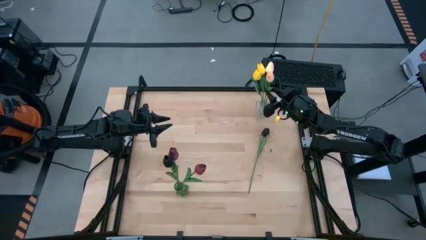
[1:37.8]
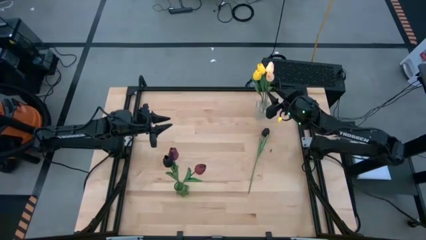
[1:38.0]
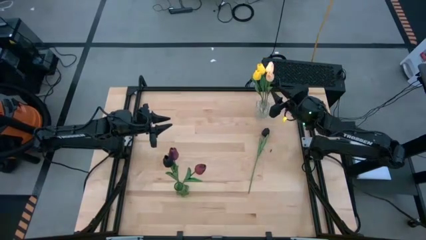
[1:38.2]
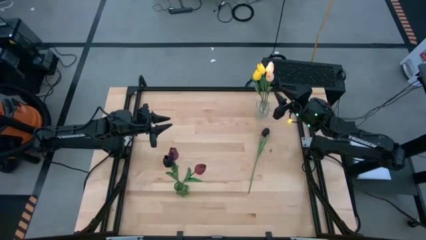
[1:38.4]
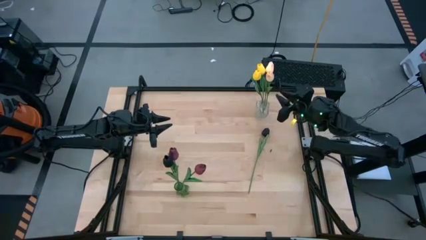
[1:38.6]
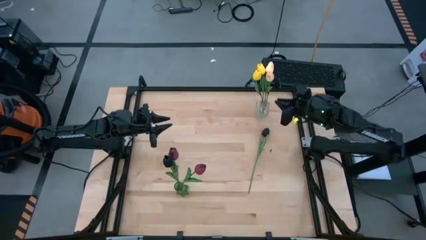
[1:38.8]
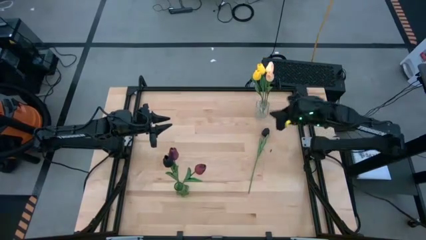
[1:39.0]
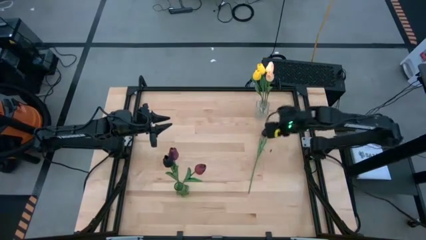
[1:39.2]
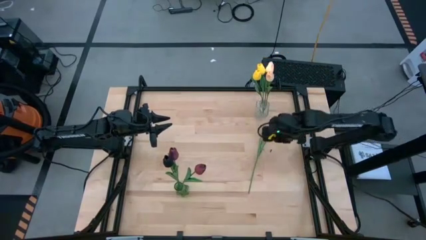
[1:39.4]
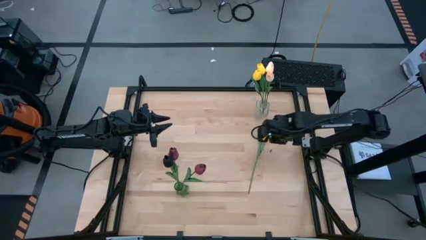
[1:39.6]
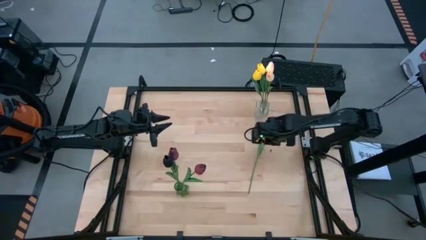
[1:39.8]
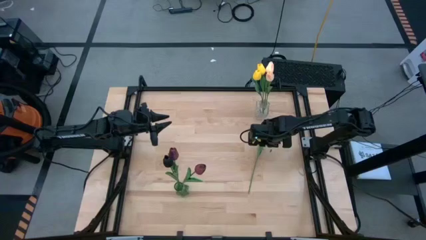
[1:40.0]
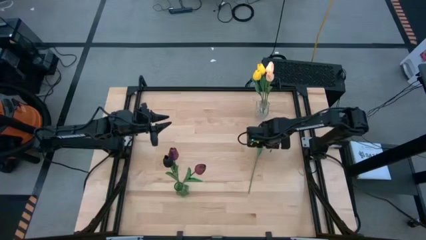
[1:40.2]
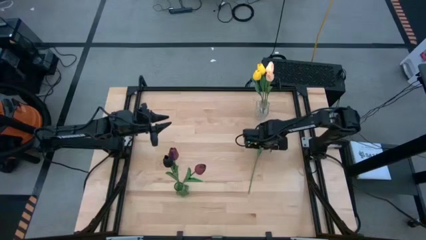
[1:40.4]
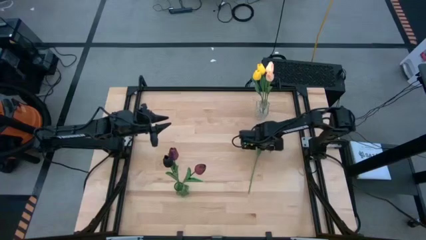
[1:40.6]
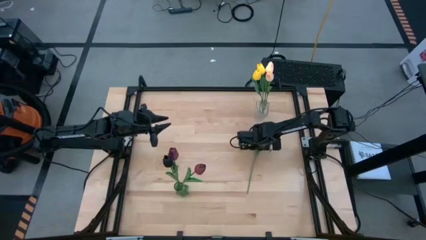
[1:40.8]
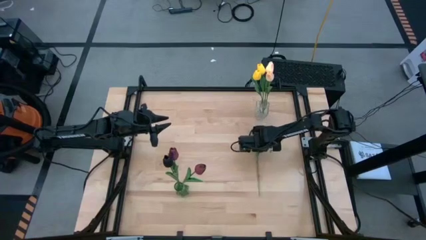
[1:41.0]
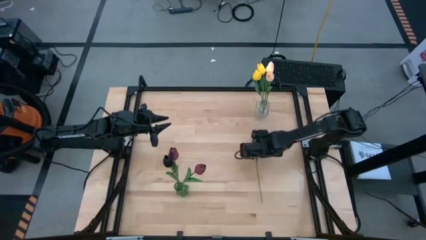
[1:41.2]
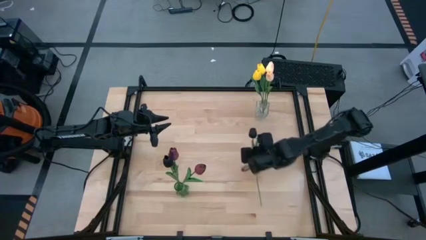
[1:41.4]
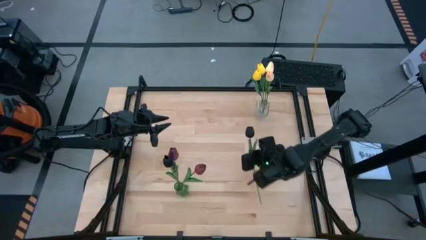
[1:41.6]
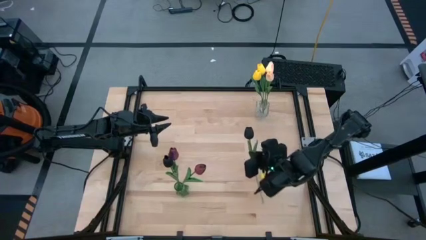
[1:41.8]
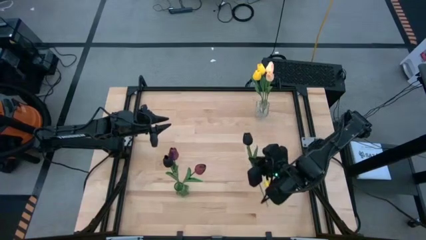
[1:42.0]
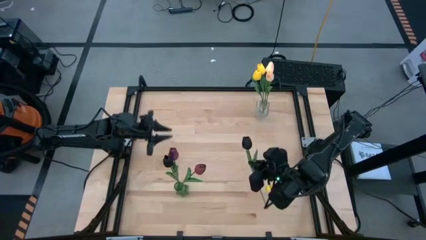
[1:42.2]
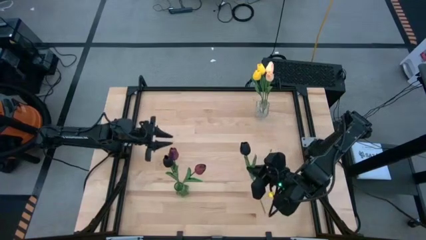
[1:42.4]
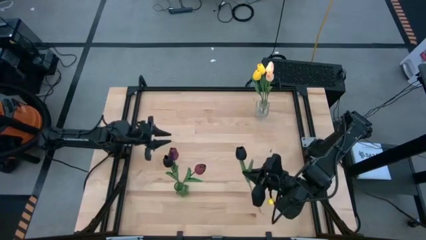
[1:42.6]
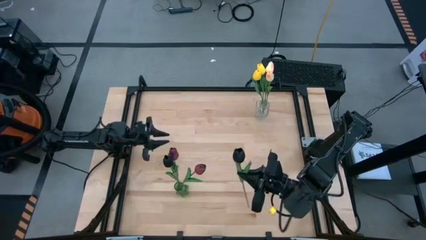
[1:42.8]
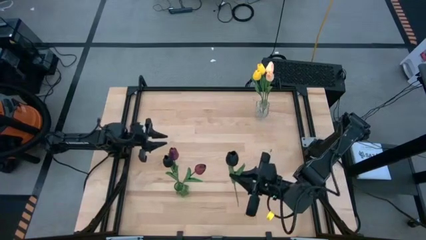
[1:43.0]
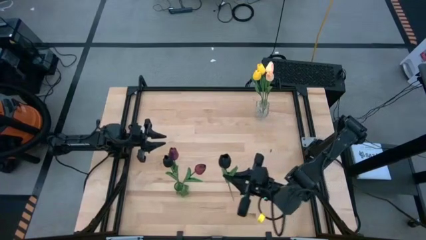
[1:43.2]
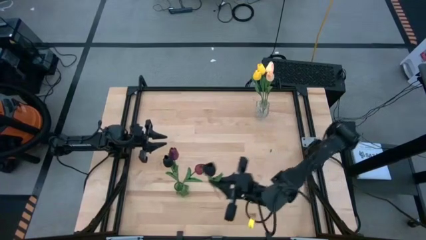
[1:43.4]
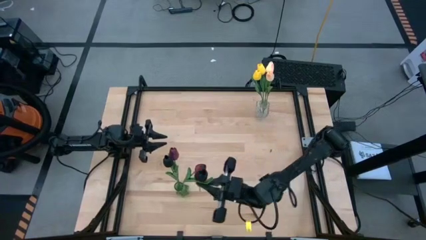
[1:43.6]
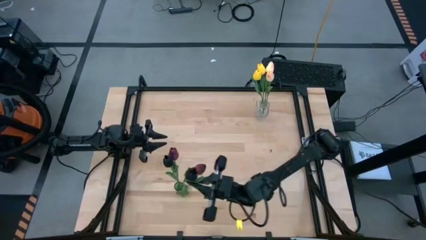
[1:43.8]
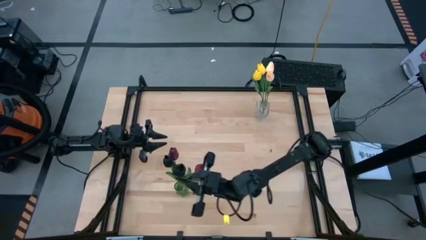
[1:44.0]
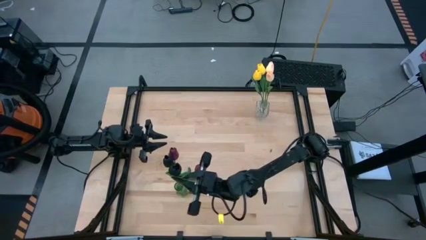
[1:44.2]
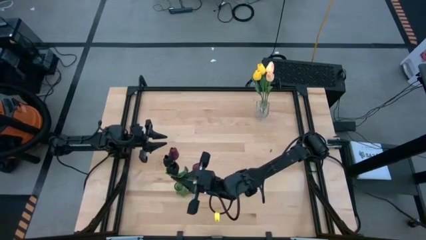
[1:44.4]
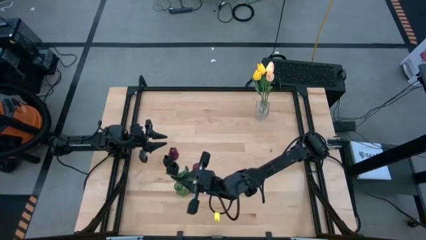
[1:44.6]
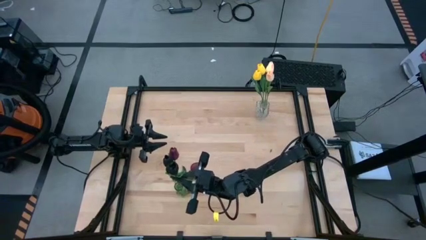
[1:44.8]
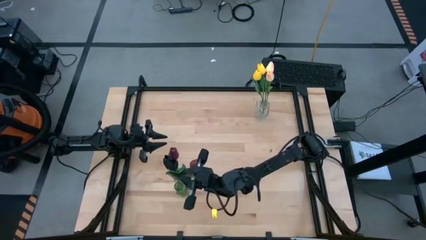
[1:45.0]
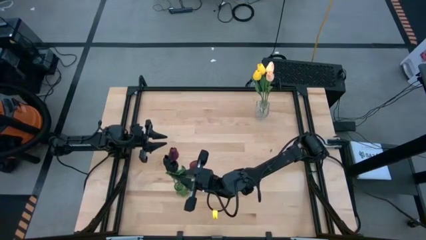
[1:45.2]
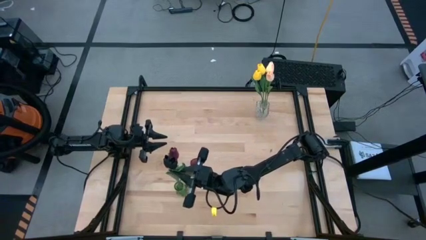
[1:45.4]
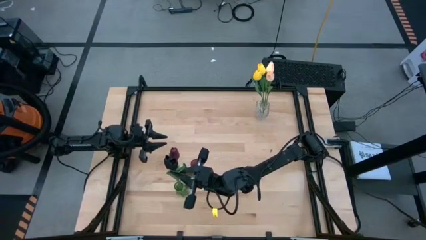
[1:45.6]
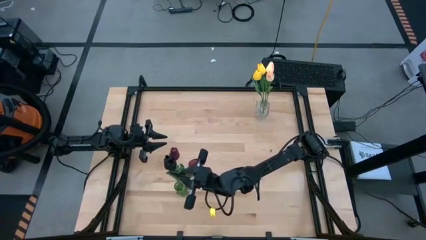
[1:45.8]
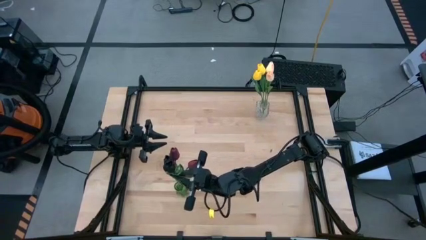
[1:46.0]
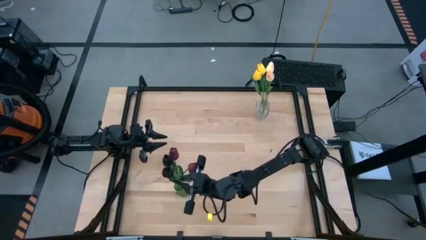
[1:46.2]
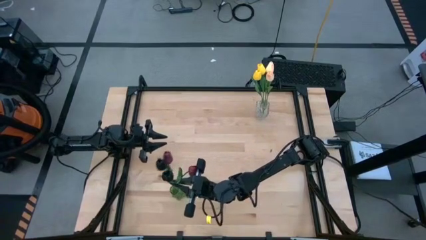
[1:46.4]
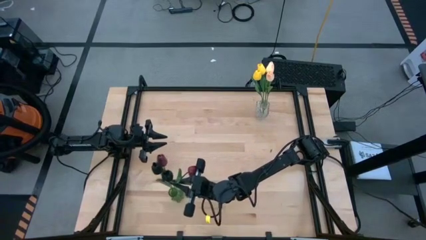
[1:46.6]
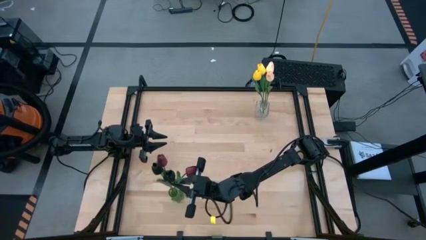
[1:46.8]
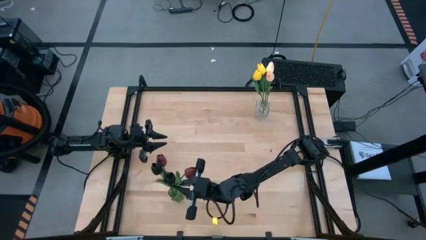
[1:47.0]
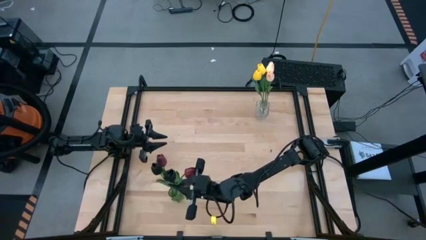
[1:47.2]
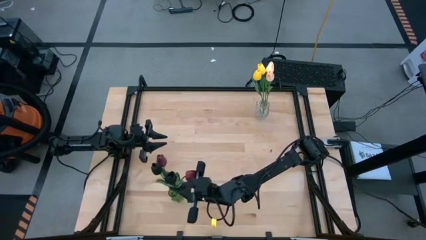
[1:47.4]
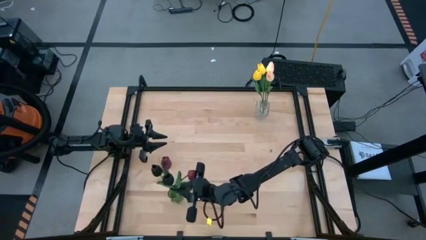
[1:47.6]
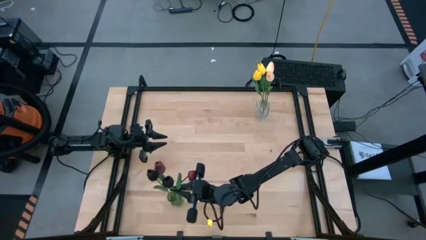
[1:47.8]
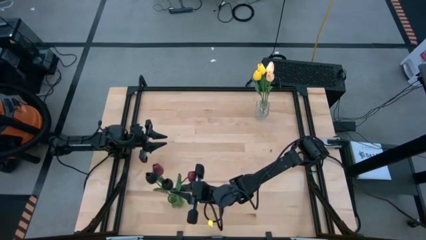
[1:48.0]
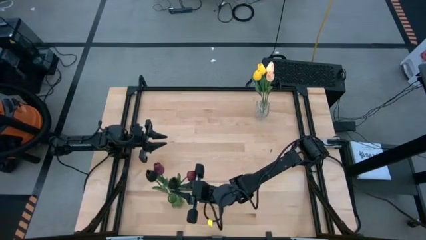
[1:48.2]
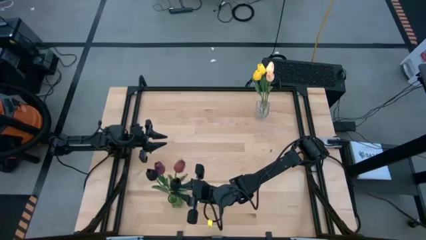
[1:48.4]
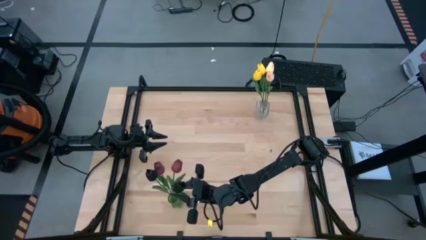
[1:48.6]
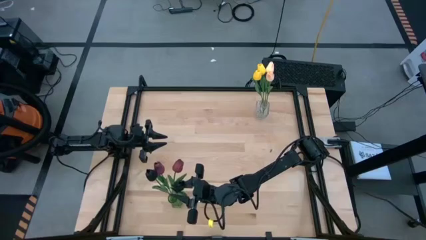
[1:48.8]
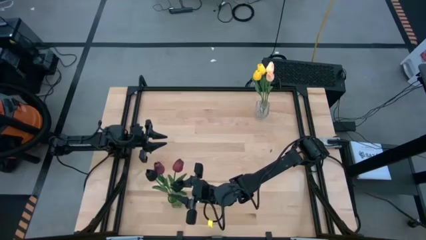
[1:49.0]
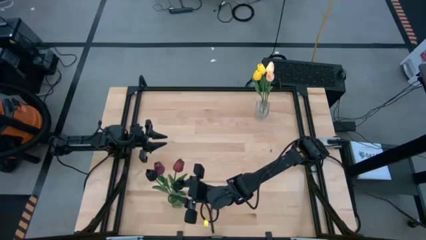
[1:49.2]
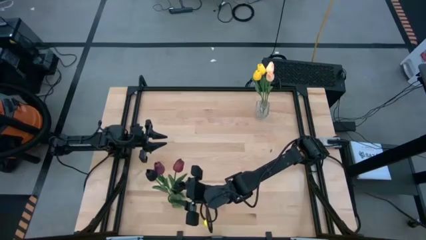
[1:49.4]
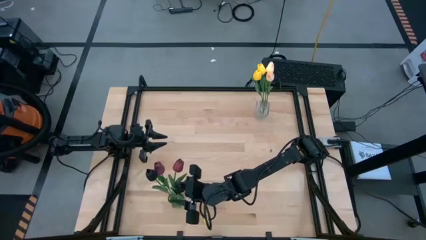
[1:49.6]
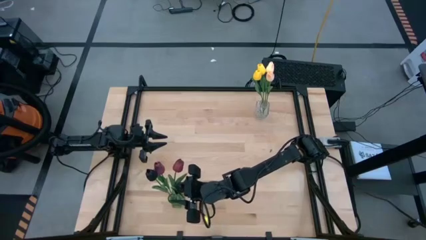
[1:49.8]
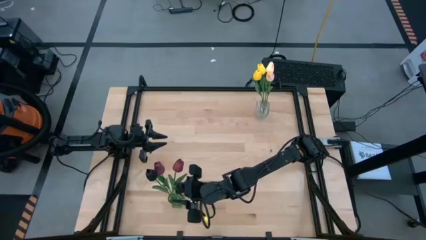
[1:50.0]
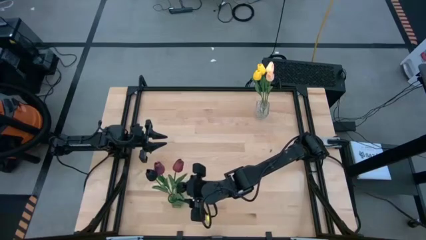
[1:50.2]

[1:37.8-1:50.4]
Task: Sort flowers into vase by color
Put the black flower into the green vase

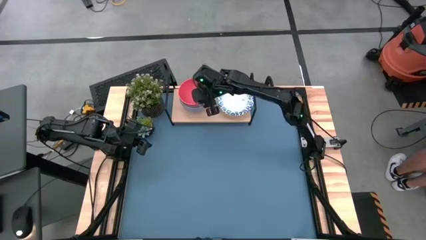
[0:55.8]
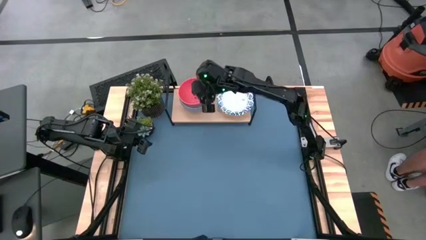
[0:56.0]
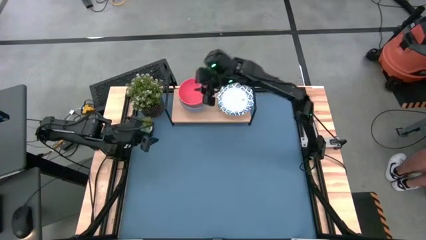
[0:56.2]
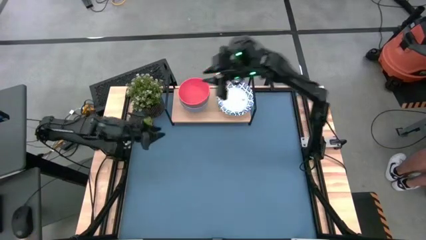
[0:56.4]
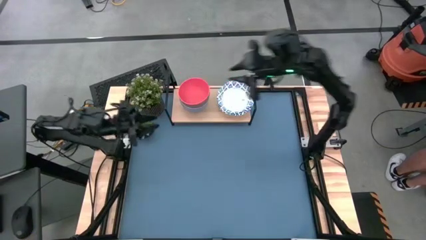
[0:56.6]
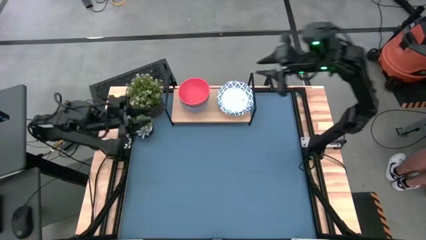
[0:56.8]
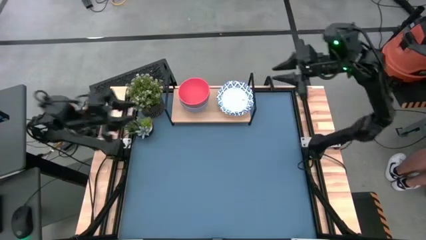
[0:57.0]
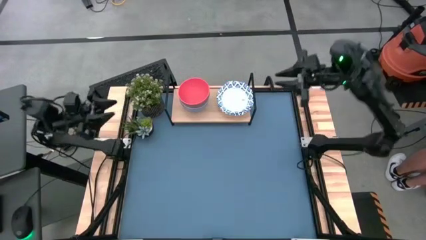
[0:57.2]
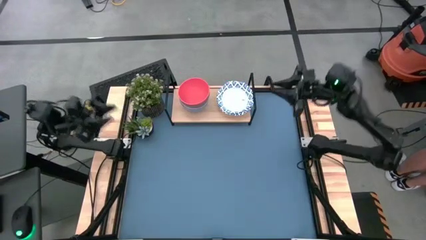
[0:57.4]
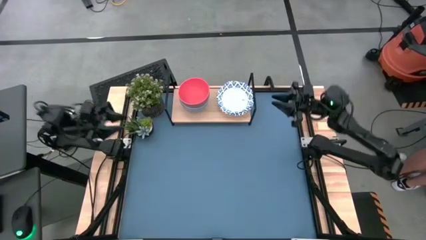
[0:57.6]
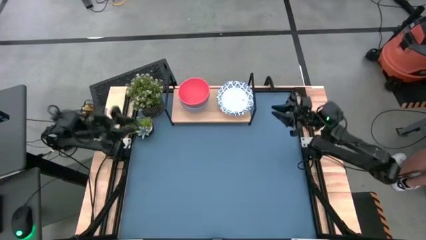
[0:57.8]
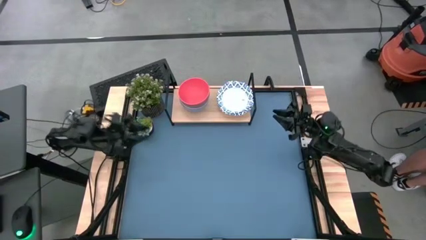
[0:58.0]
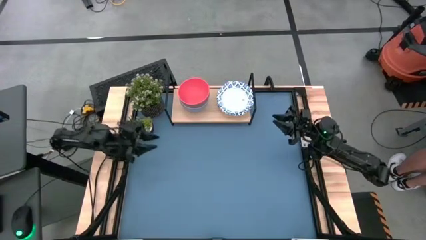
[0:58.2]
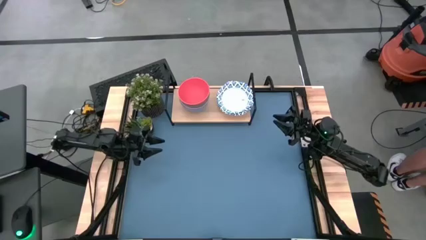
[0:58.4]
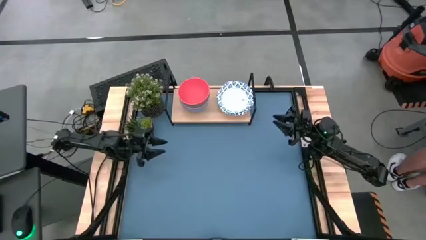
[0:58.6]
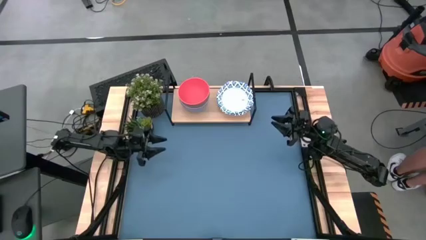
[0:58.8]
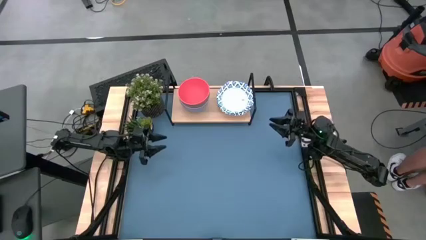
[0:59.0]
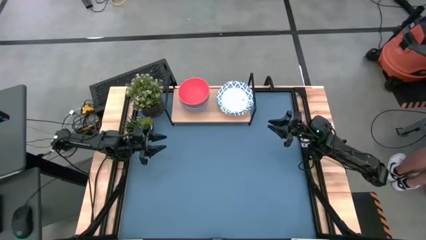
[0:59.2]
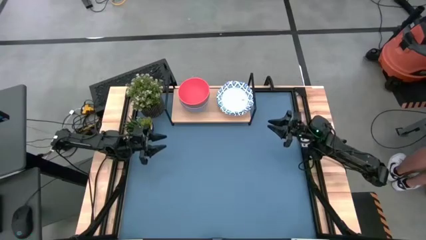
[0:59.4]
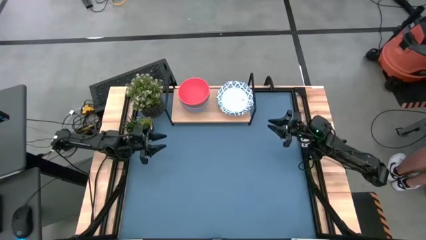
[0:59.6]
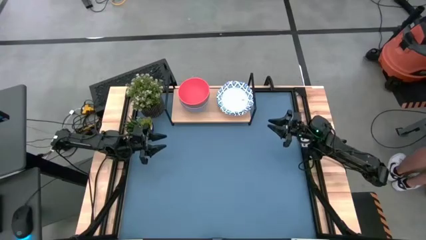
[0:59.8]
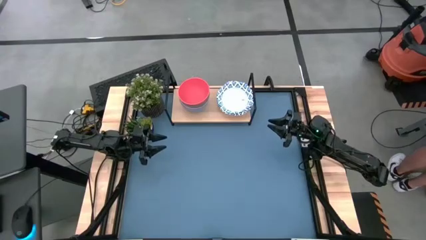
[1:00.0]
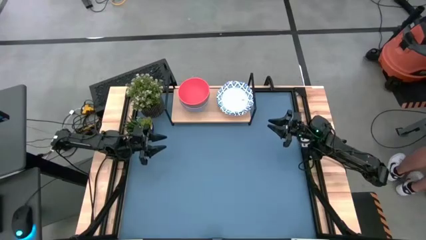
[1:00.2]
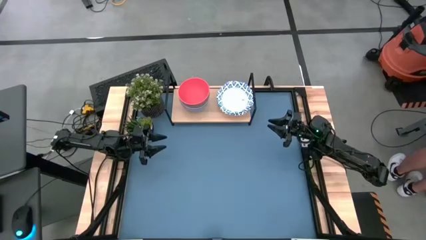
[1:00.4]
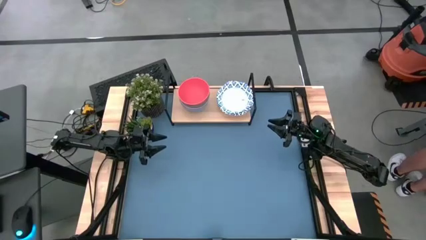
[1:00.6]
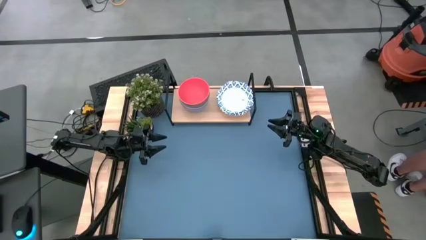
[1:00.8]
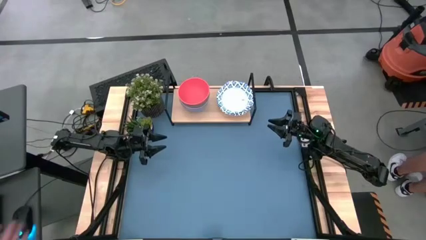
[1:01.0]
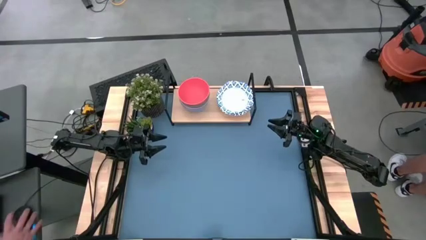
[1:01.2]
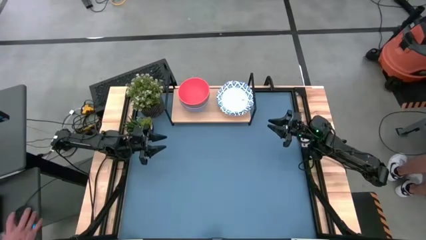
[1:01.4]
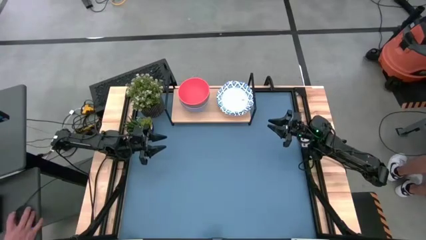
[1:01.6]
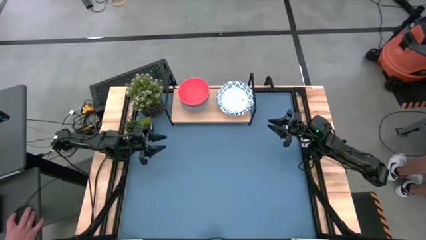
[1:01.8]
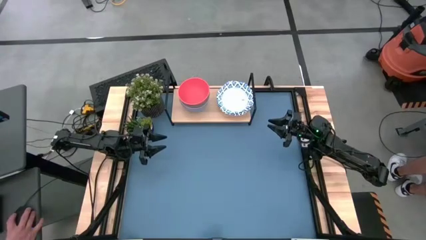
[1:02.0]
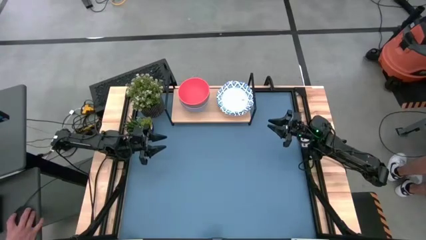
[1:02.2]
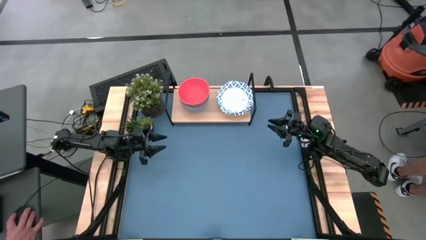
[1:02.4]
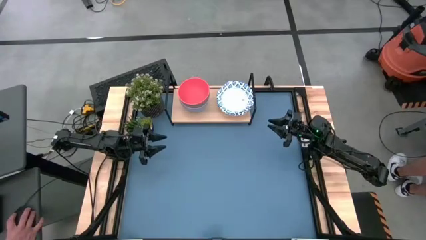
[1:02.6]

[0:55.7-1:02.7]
Task: Place and stack bowls onto a shelf
Return to Home Position
